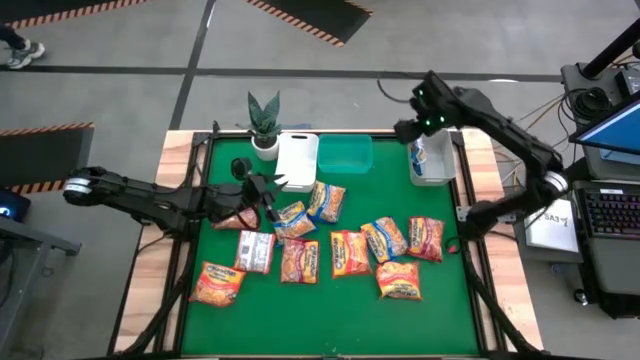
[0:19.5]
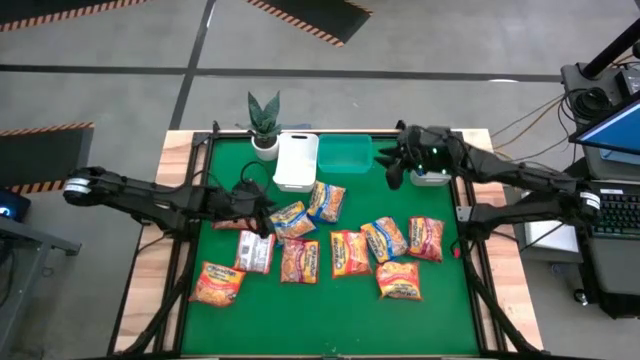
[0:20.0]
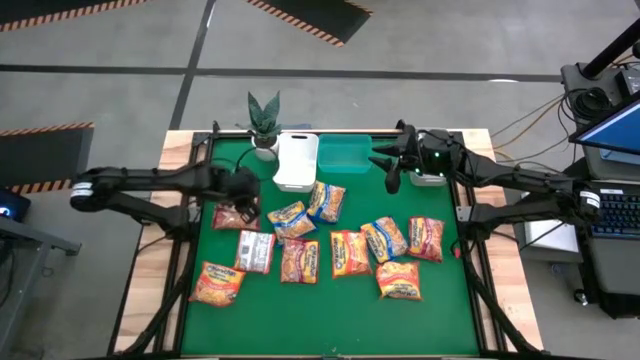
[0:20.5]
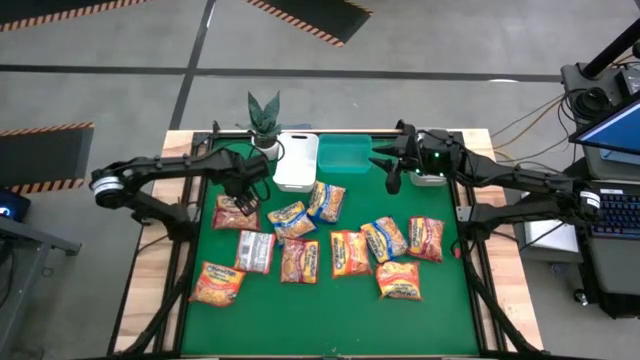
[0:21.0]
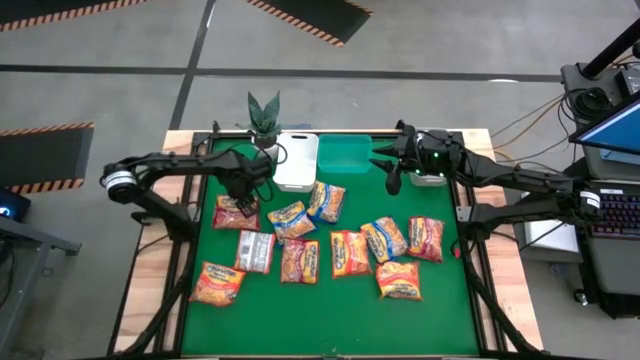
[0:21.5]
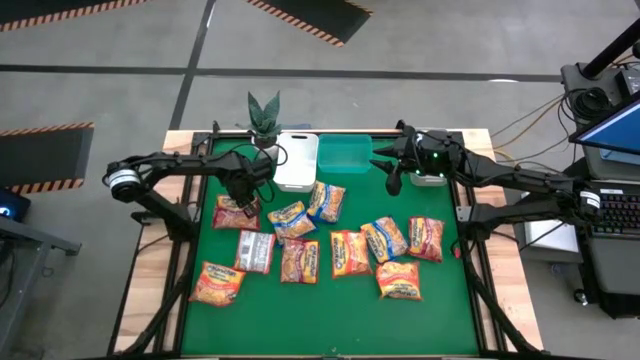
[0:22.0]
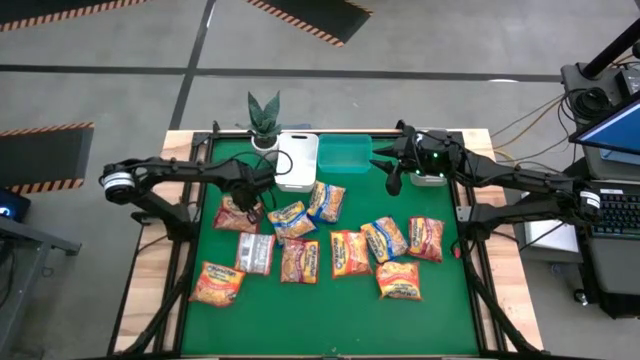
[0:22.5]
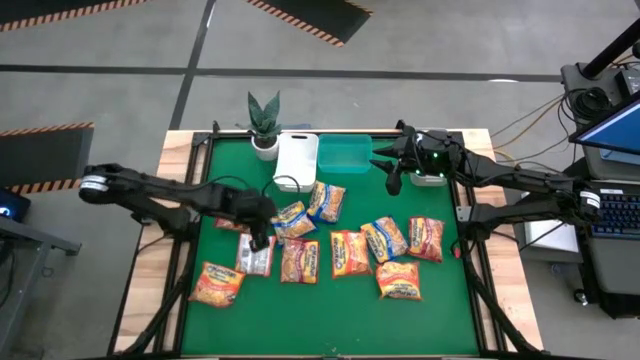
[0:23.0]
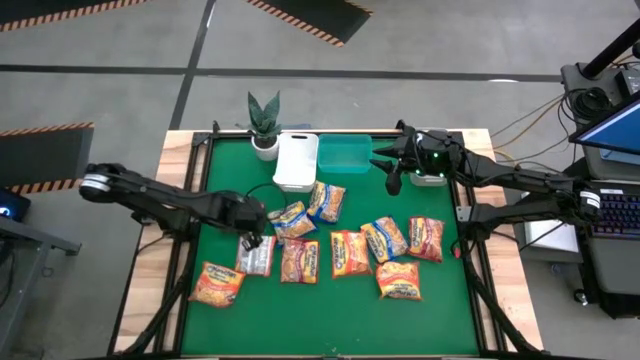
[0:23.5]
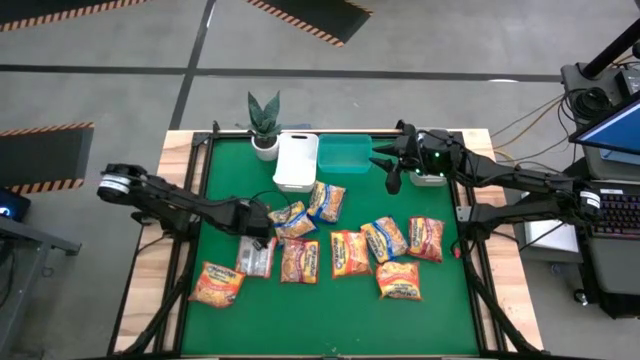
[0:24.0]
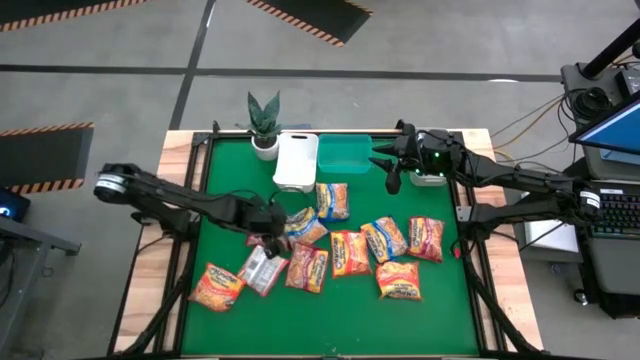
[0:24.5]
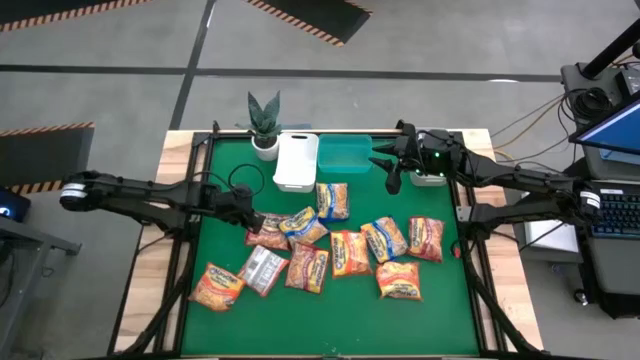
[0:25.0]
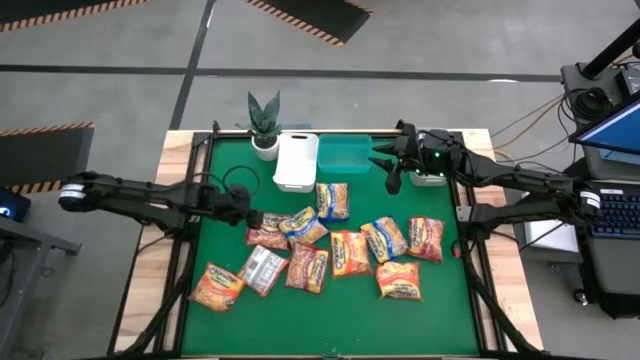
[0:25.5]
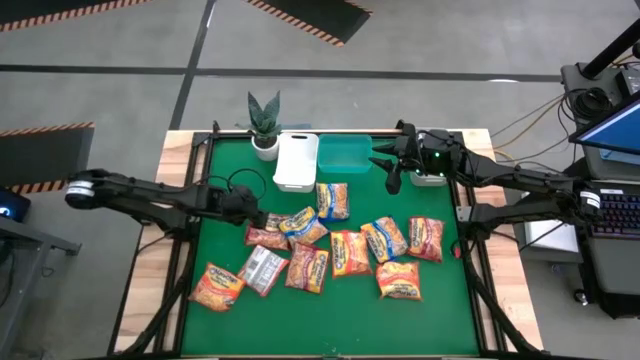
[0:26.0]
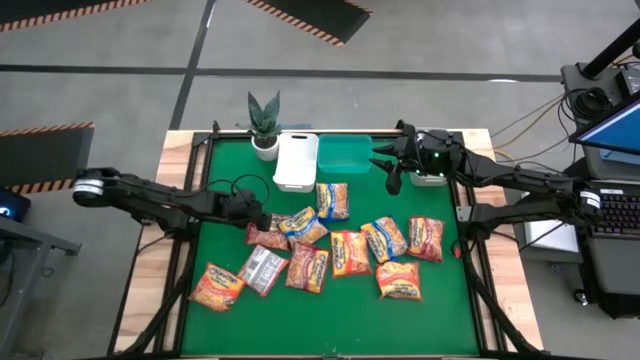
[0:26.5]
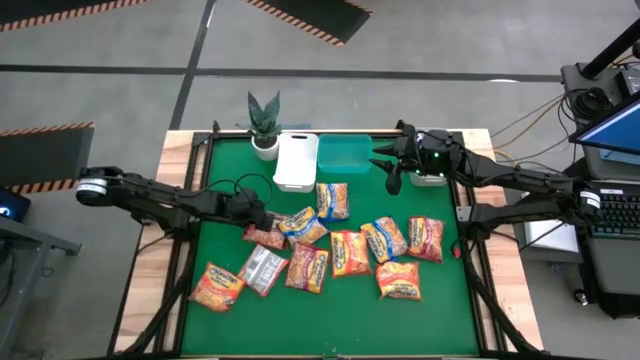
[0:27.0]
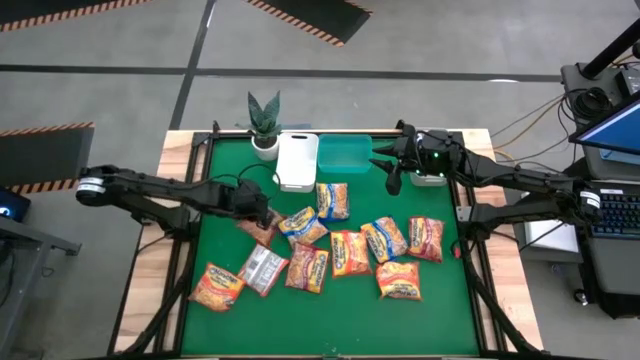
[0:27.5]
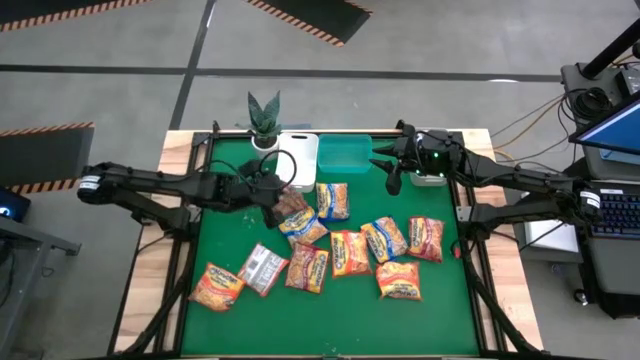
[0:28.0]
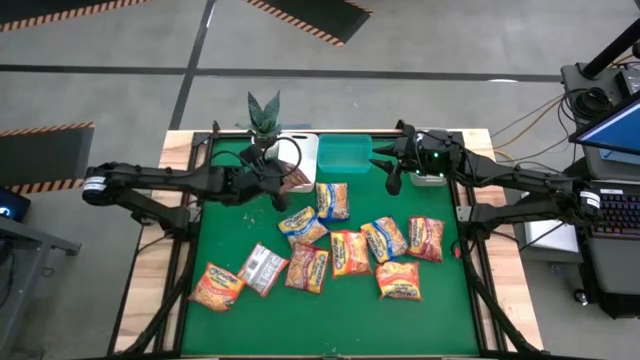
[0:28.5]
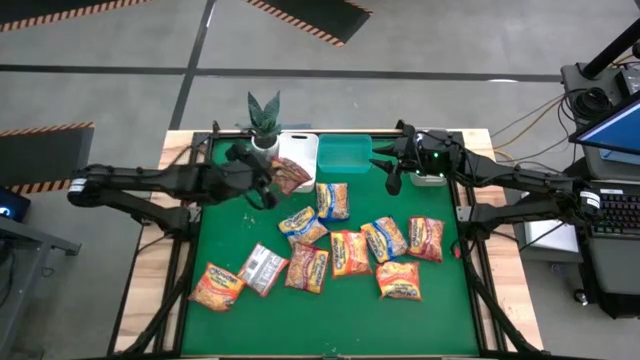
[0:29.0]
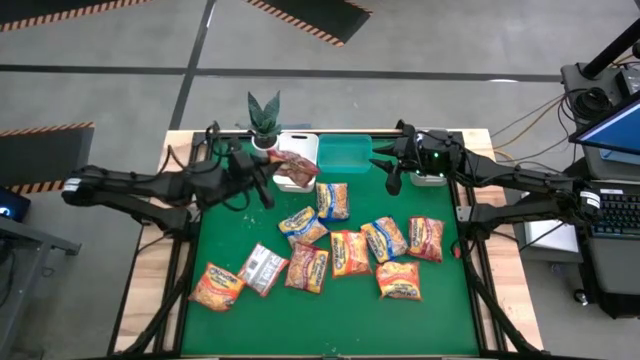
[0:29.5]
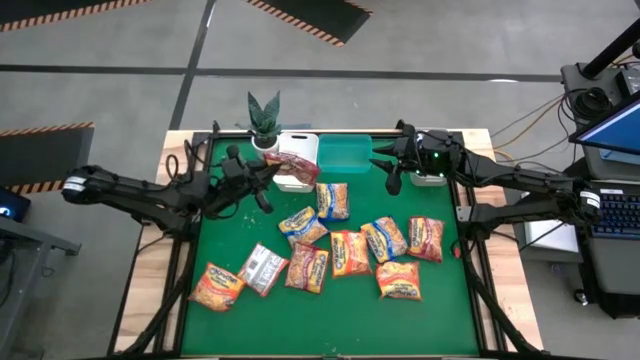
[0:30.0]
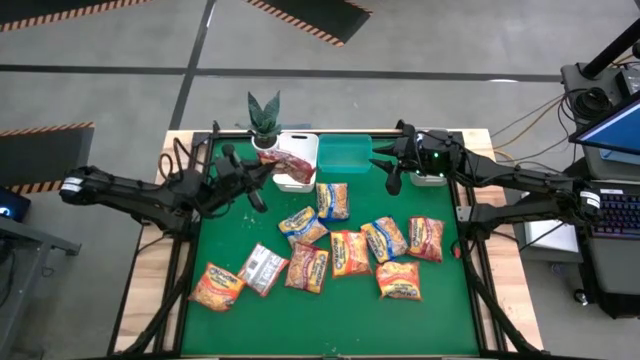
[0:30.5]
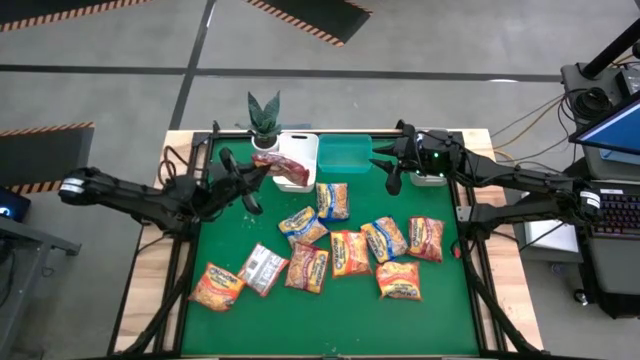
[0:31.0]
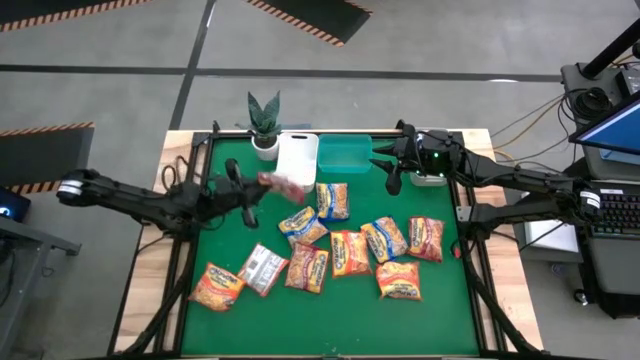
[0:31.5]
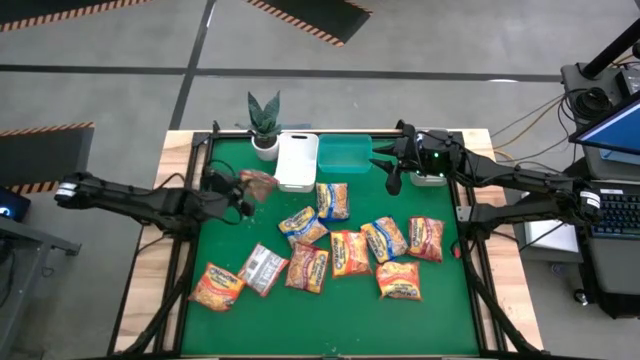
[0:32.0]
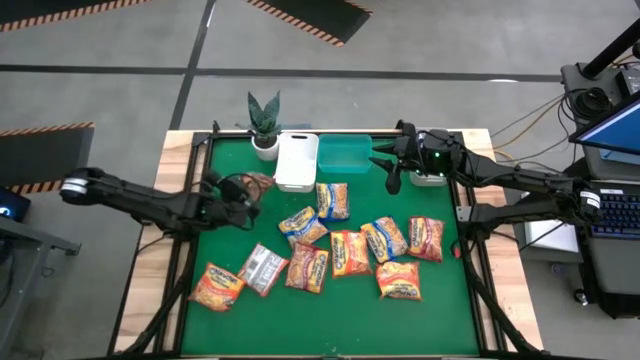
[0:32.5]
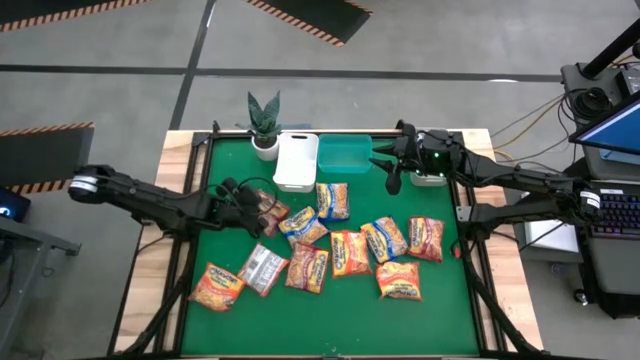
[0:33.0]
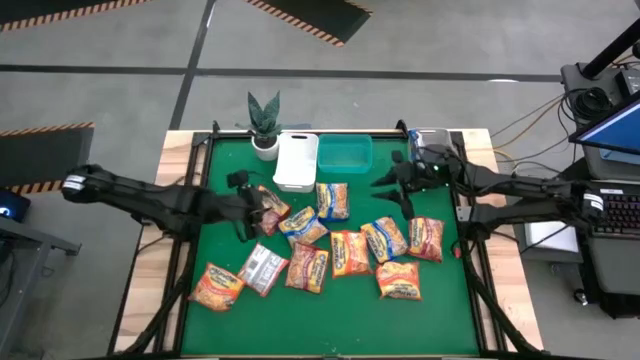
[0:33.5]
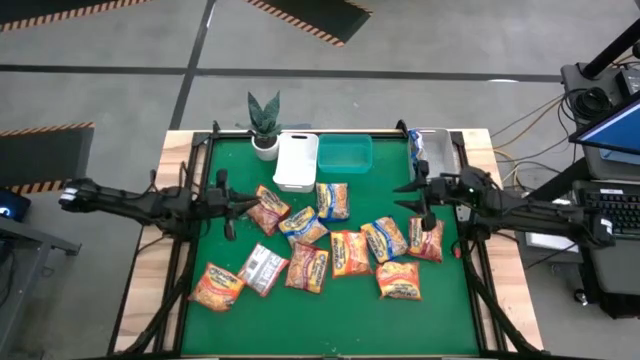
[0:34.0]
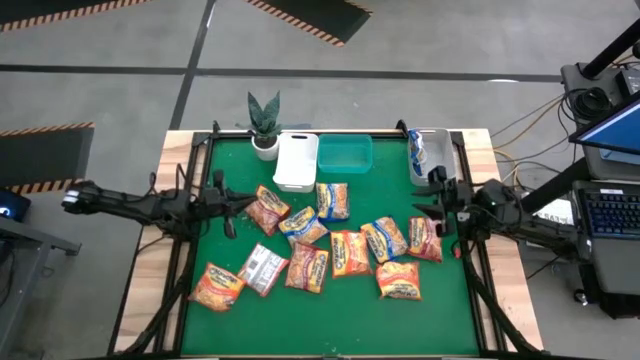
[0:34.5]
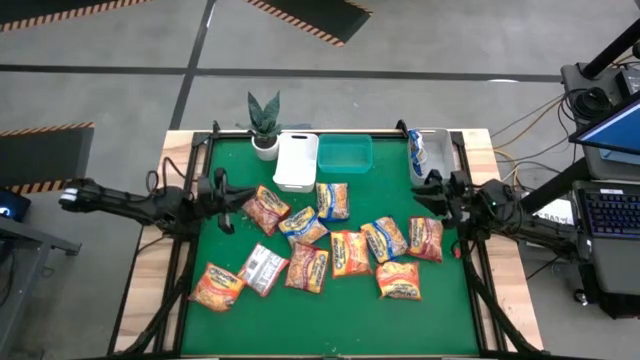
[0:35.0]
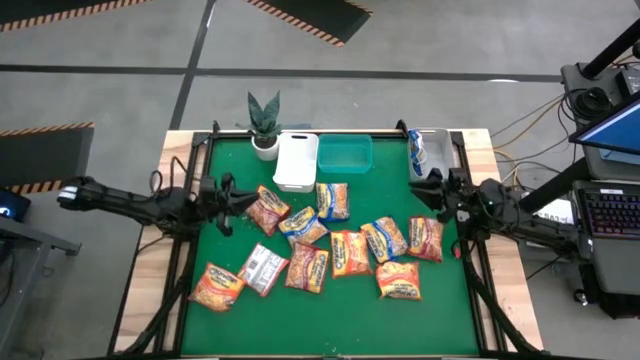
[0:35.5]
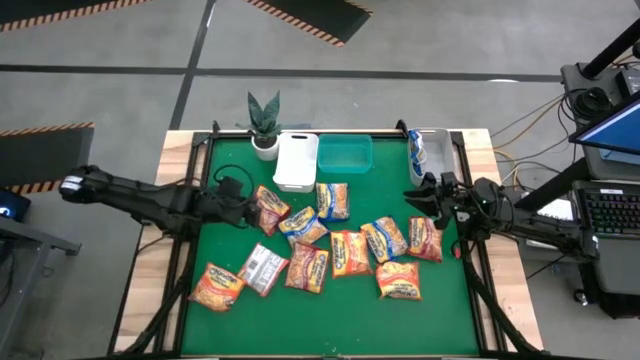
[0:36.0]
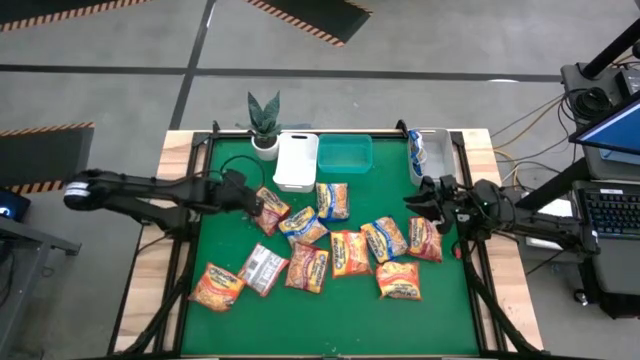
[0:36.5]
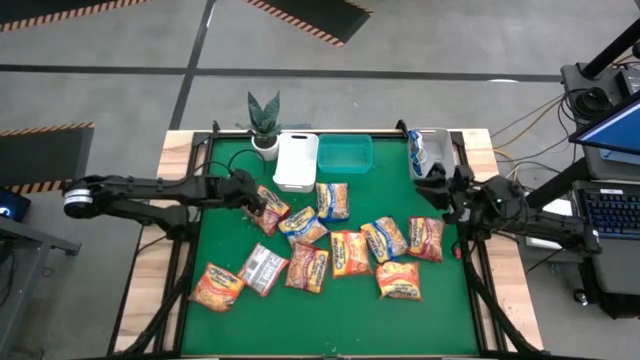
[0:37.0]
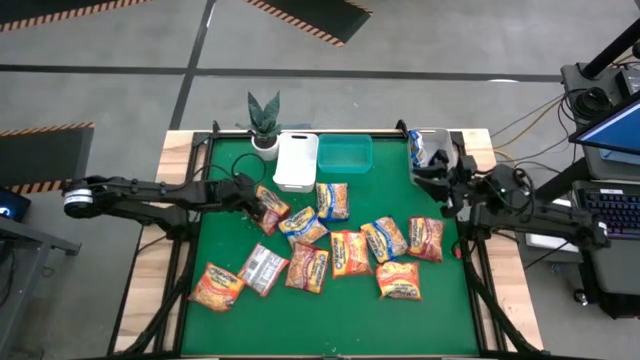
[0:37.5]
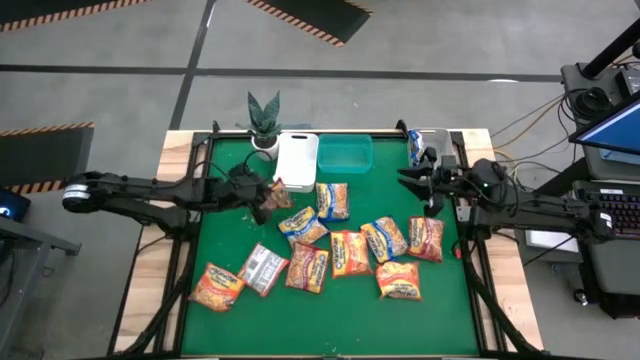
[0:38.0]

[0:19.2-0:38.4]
Task: Sort Maruchan noodles
Put the red noodle pack into the white bin

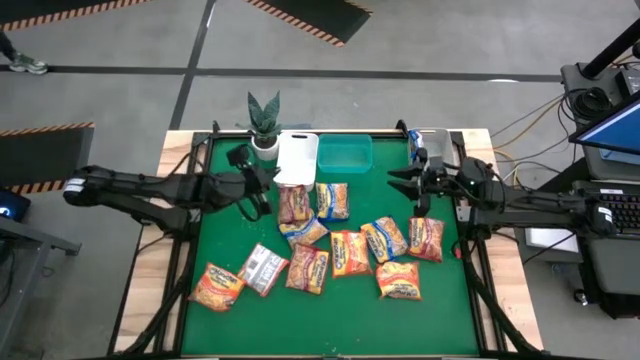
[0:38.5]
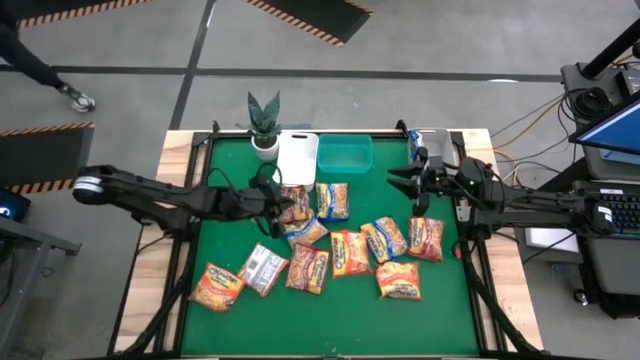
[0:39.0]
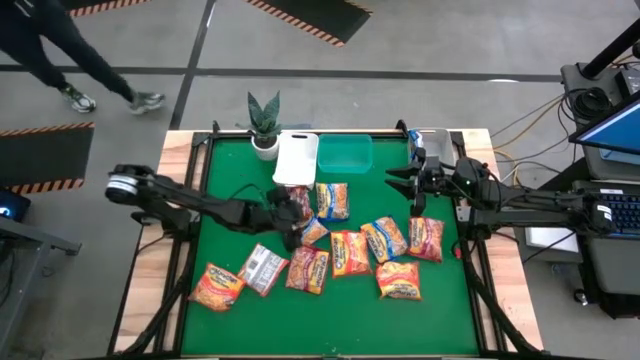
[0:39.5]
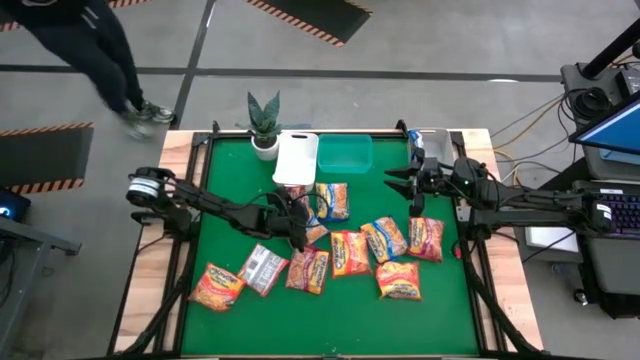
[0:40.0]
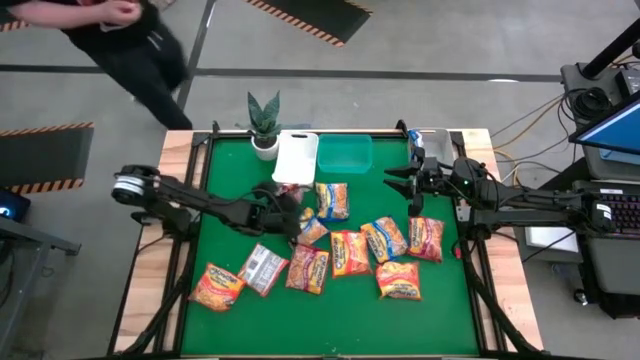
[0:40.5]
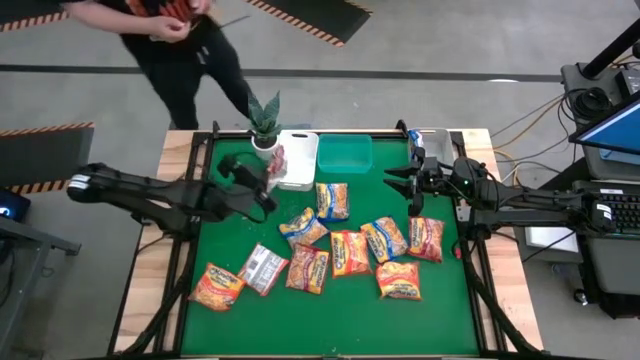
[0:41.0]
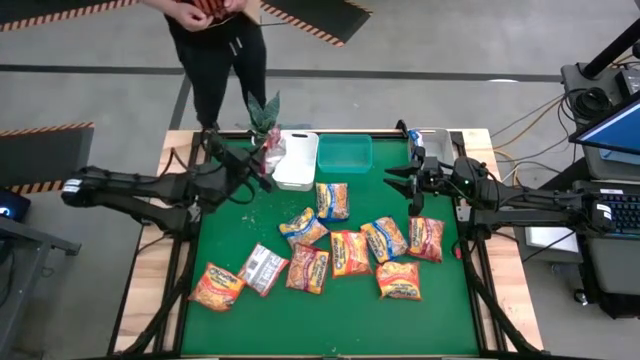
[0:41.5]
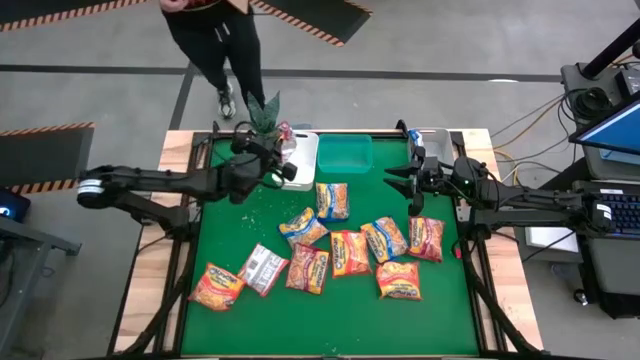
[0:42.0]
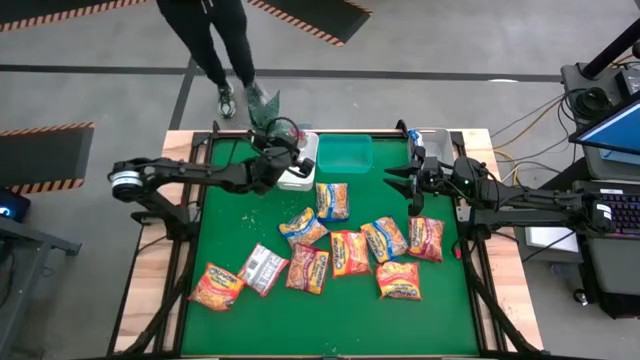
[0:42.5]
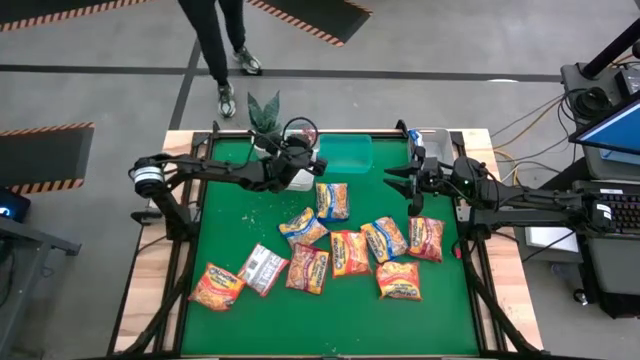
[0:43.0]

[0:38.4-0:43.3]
Put the red noodle pack into the white bin
